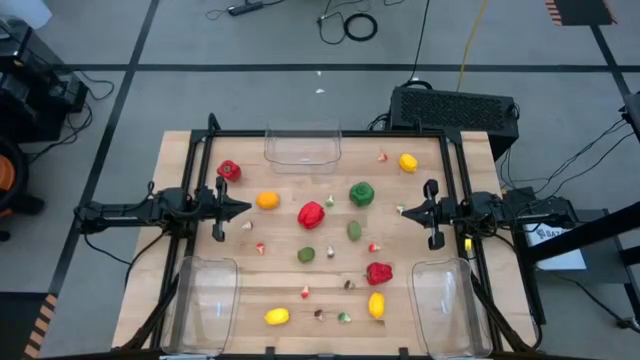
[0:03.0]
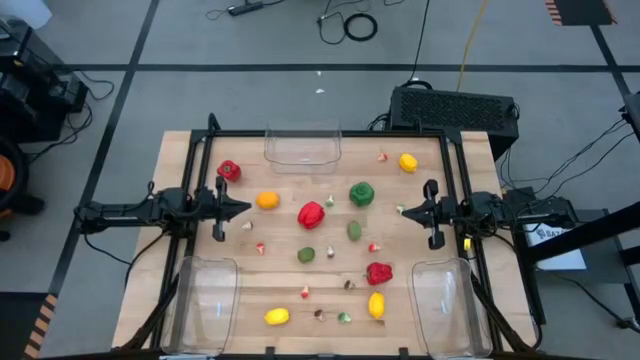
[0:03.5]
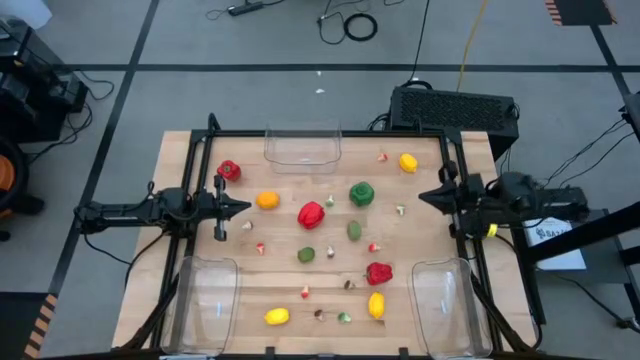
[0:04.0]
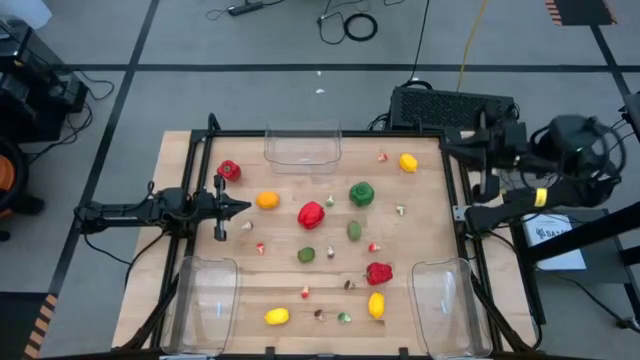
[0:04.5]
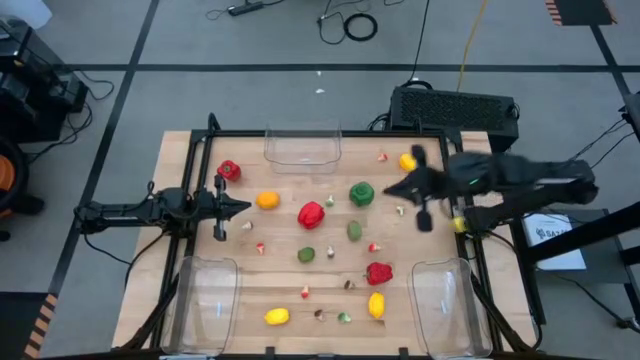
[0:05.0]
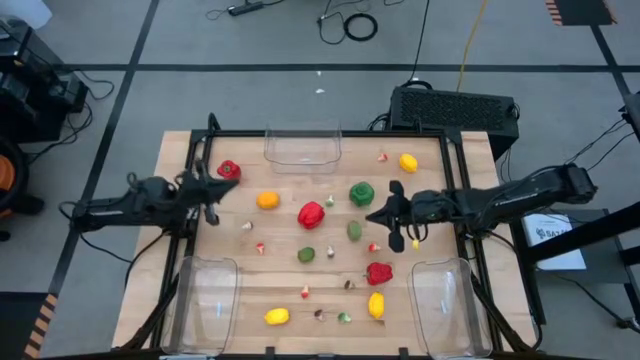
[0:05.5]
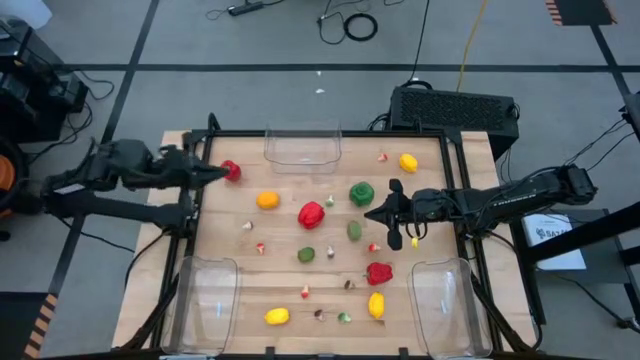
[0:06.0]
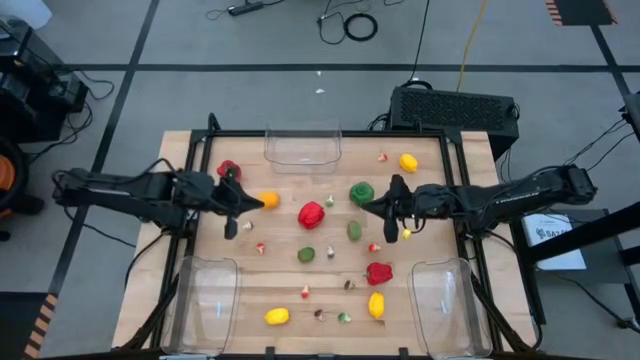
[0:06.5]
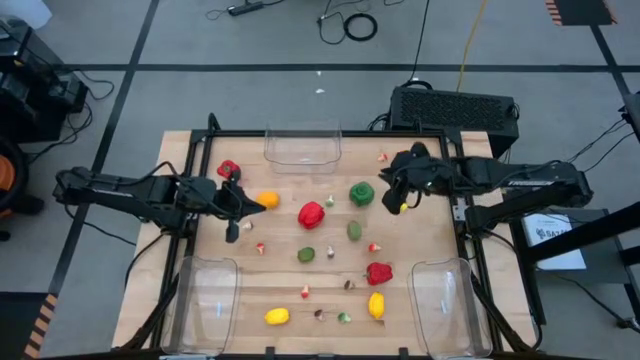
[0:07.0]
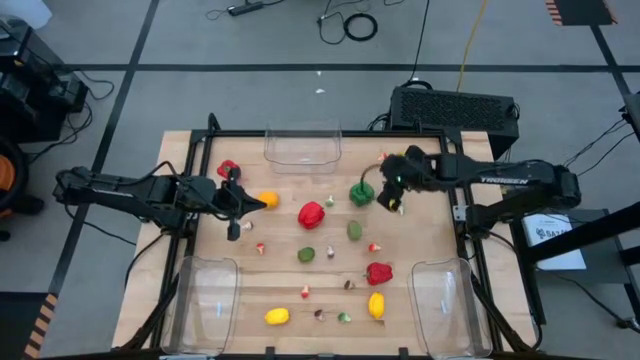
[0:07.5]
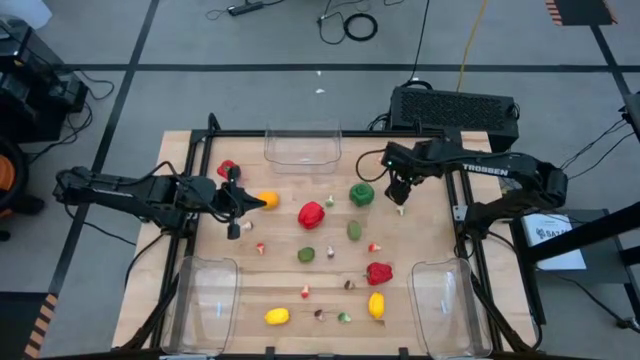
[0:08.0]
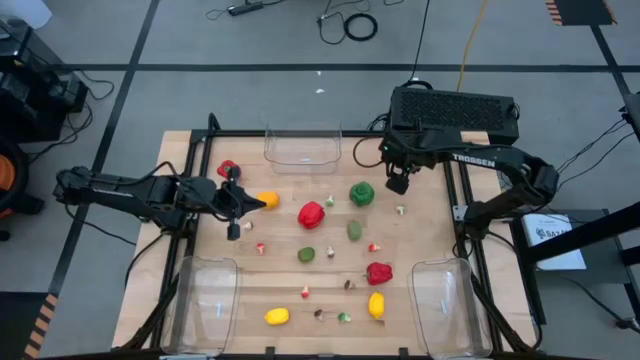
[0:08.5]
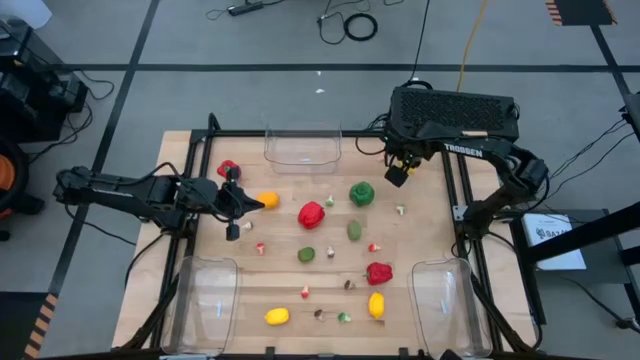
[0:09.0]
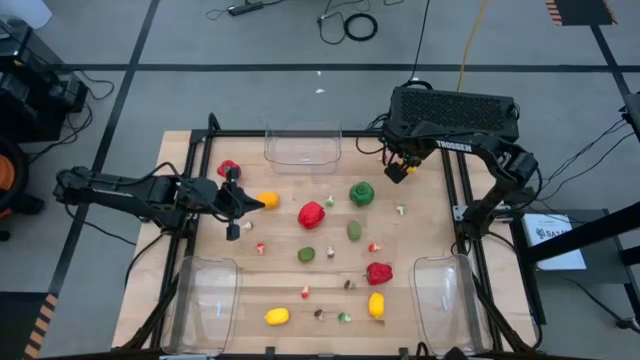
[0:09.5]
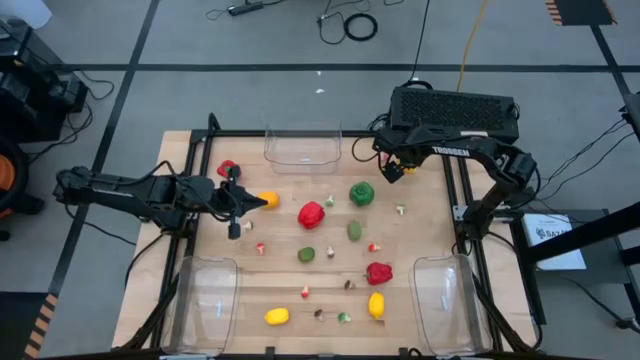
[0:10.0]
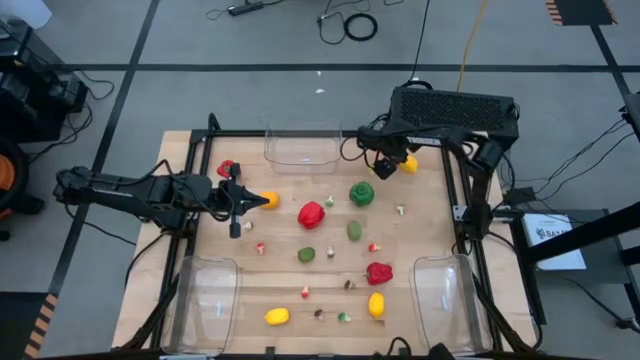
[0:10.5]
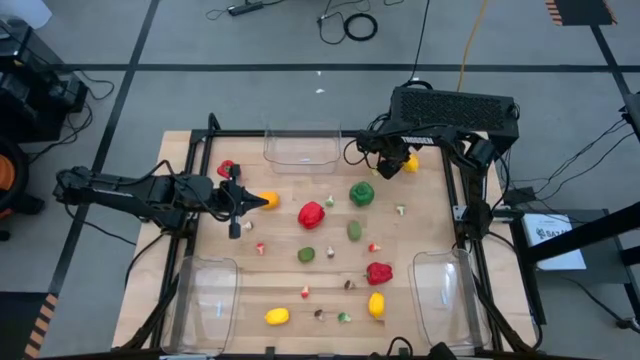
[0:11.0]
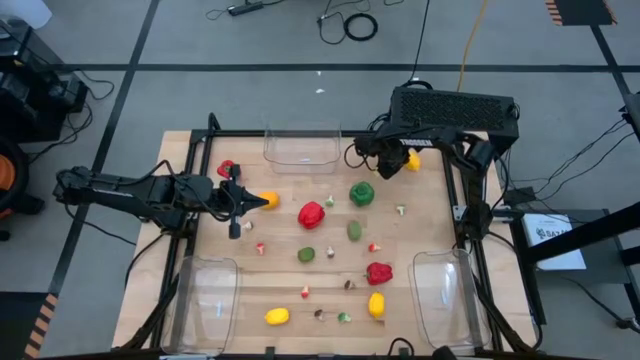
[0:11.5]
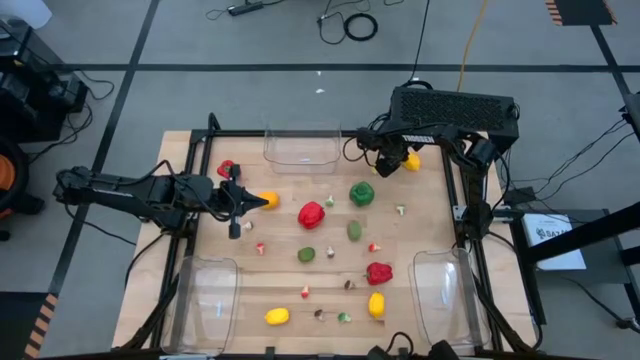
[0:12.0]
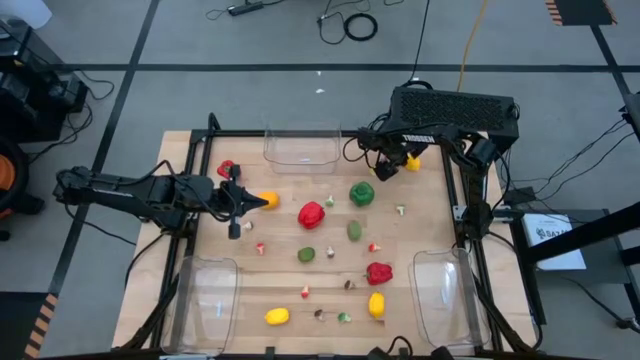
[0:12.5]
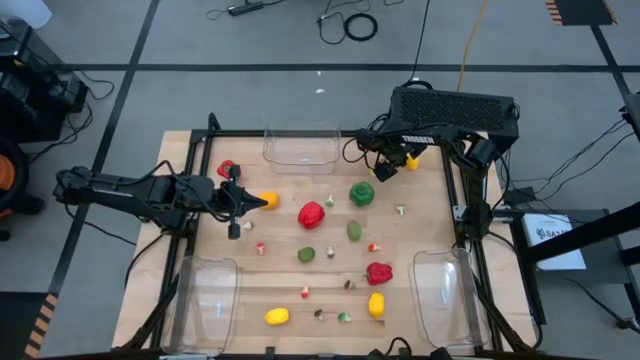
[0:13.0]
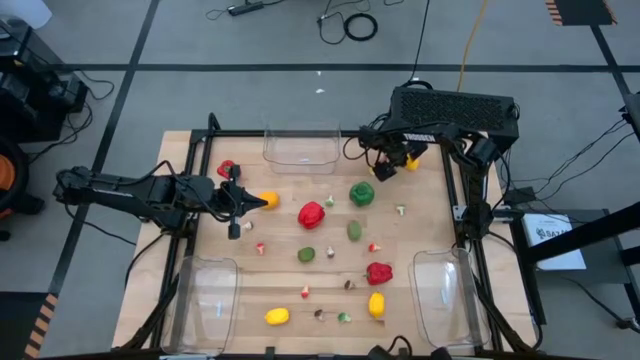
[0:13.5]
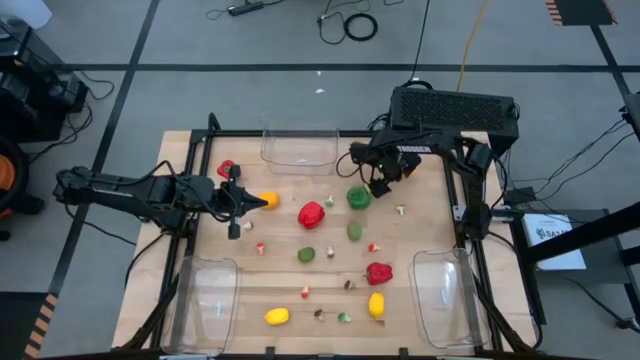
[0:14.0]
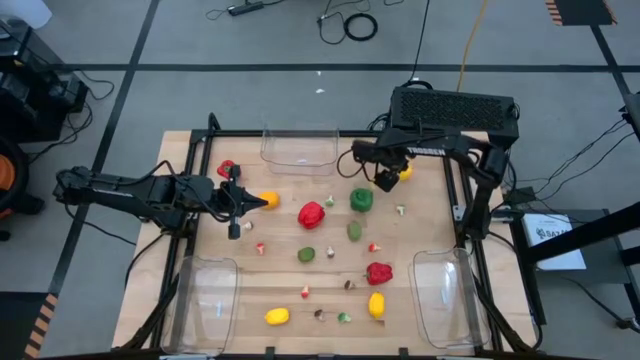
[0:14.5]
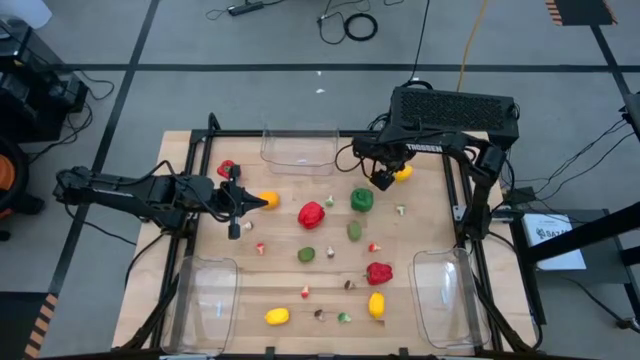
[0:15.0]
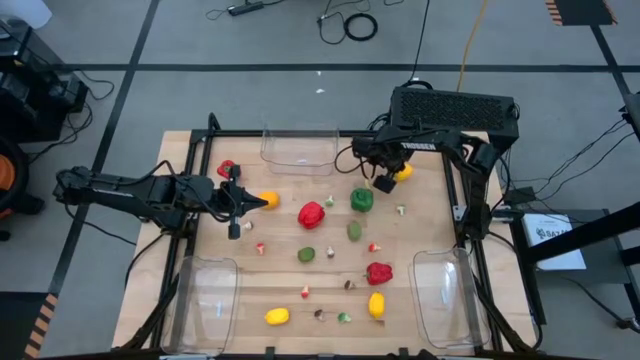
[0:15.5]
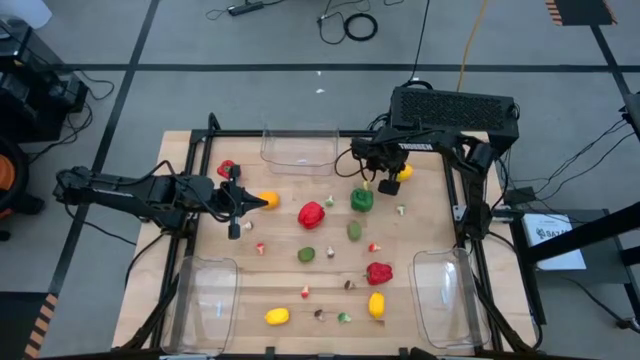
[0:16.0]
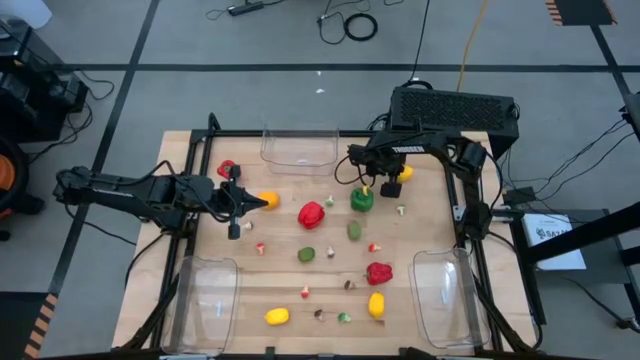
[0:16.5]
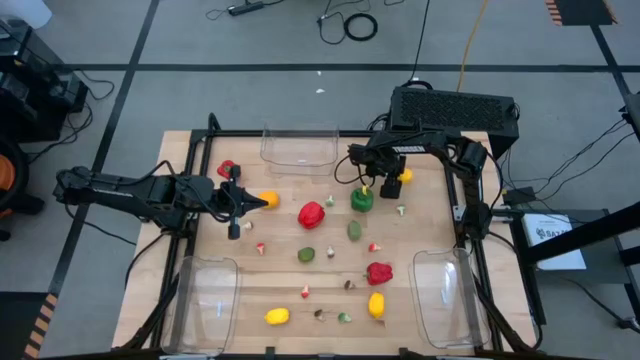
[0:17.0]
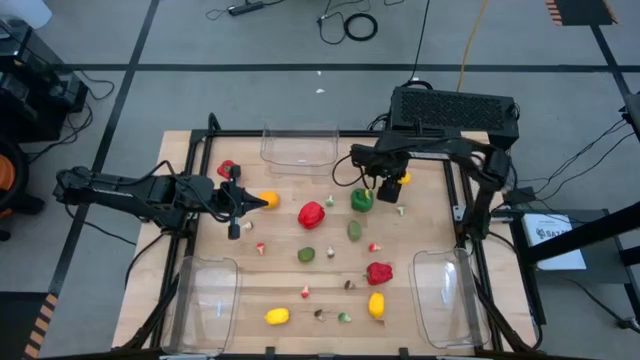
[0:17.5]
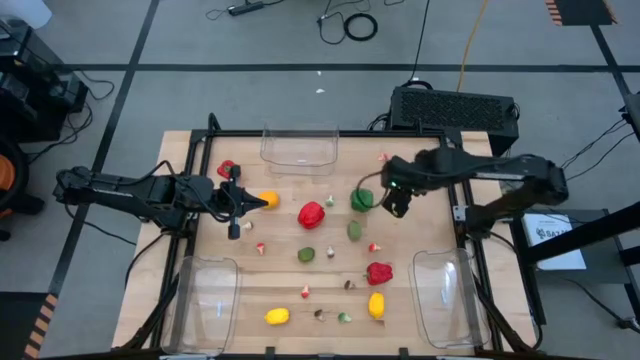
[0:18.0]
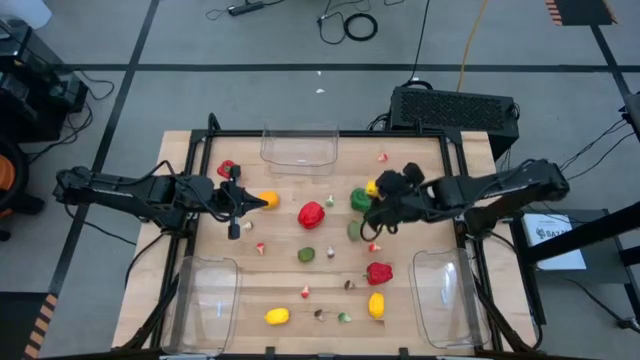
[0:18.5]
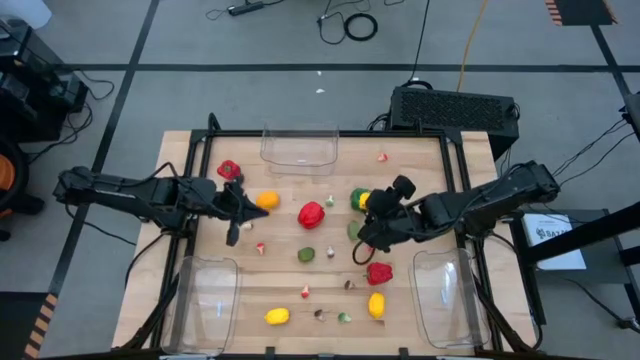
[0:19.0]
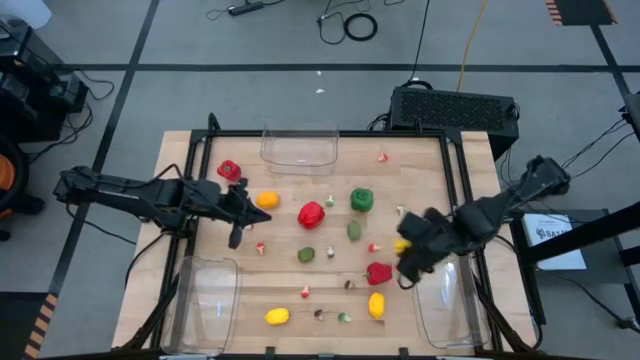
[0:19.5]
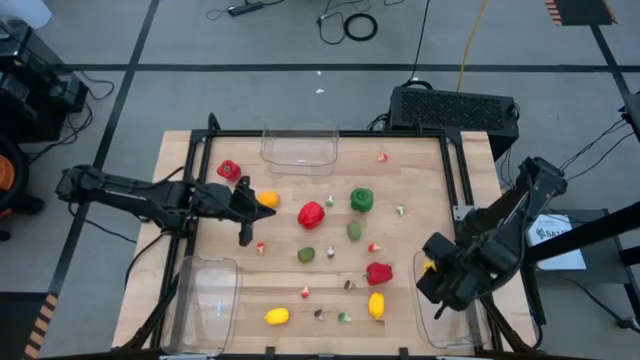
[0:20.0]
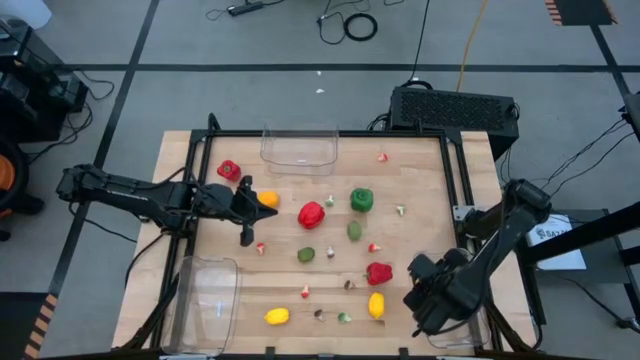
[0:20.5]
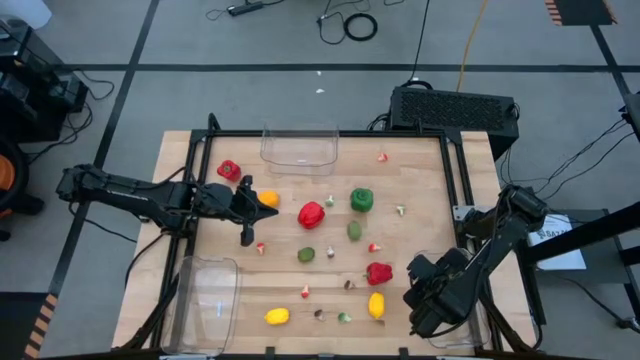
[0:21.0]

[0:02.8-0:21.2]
Task: Sort produce into baskets
Put the yellow lemon into the bottom right transparent bin

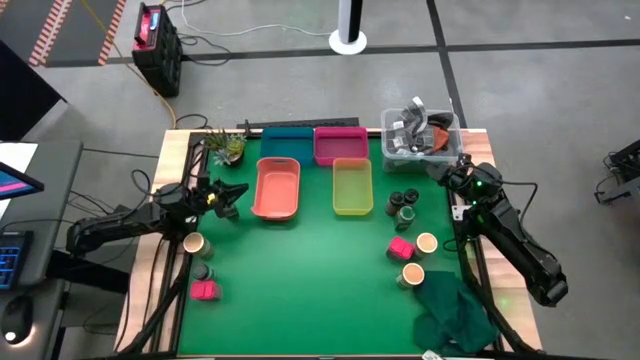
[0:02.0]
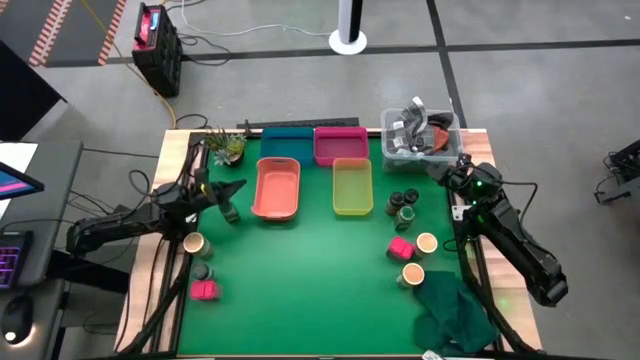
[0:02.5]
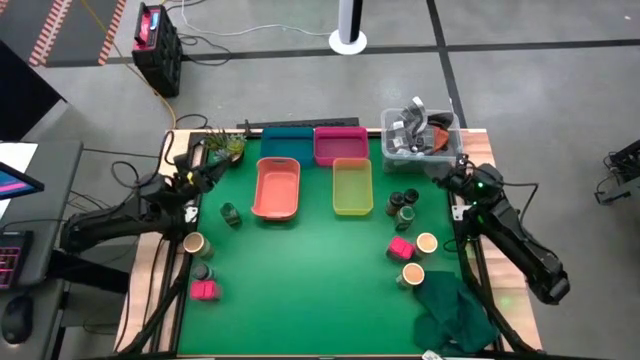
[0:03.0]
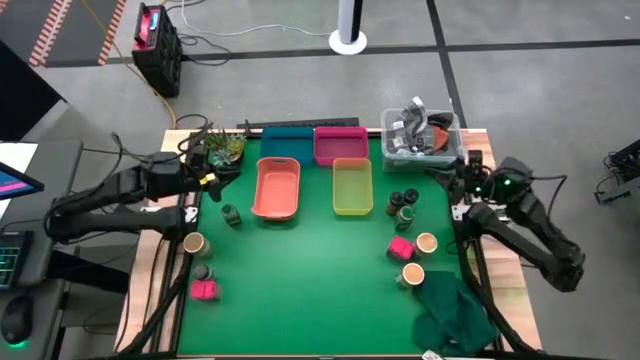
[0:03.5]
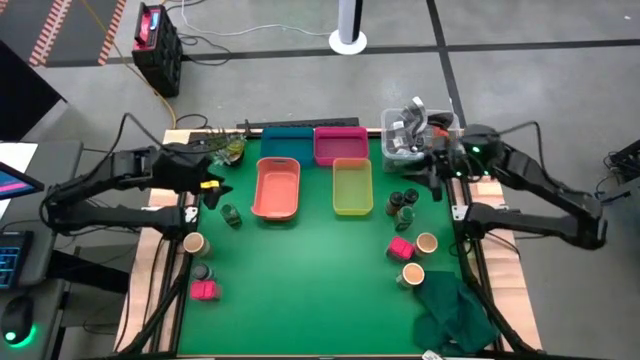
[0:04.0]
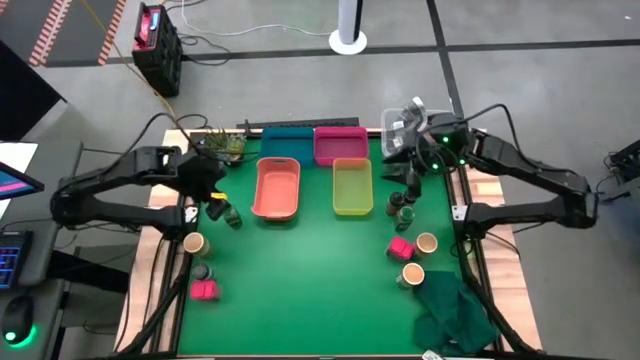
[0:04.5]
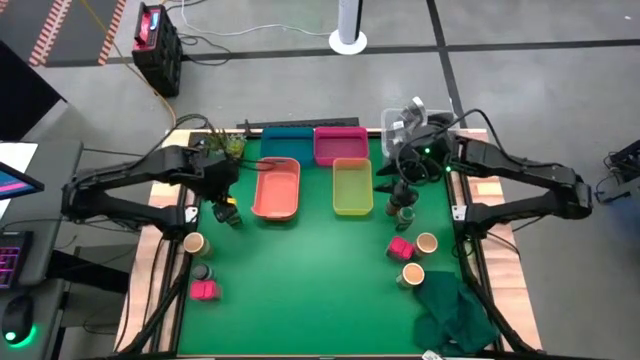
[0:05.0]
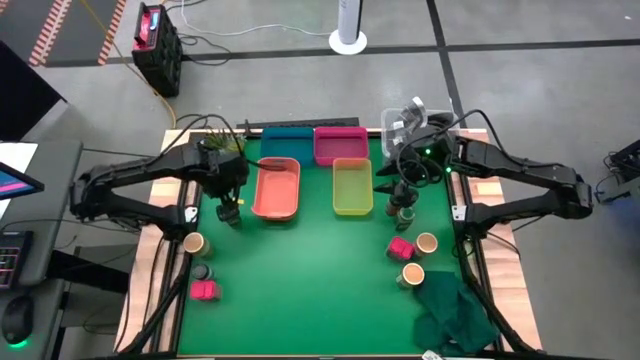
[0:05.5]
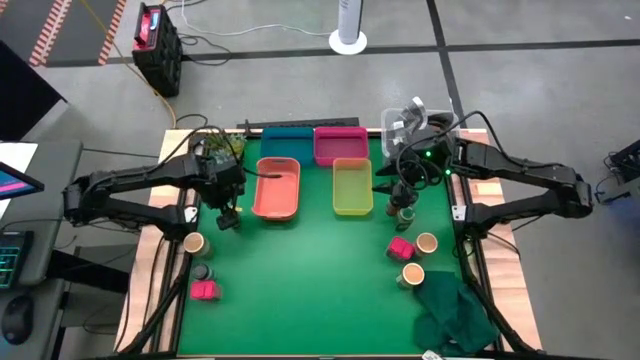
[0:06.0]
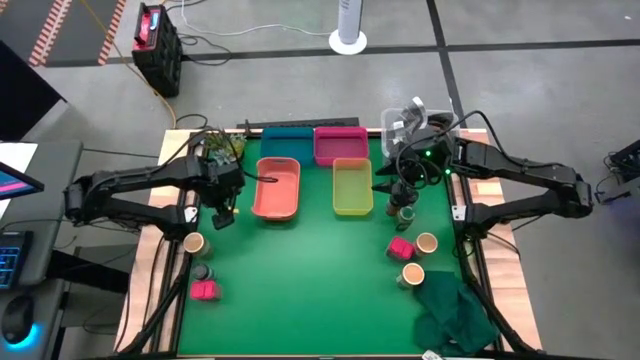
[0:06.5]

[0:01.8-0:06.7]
Task: Sort spices by type
Put the left seasoning bottle into the orange bin
